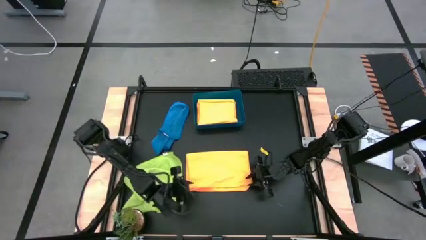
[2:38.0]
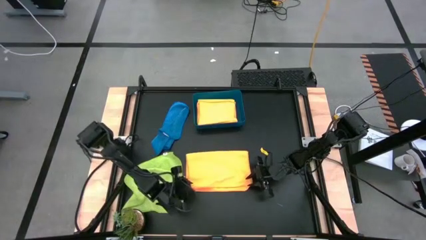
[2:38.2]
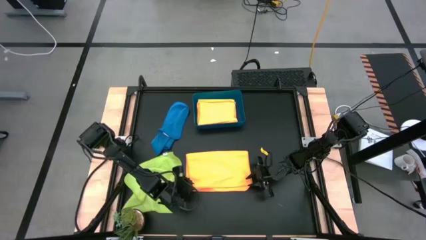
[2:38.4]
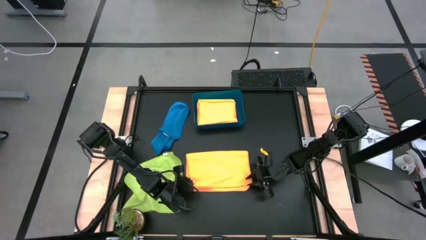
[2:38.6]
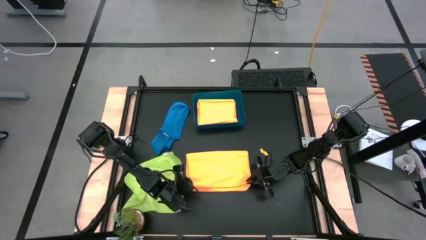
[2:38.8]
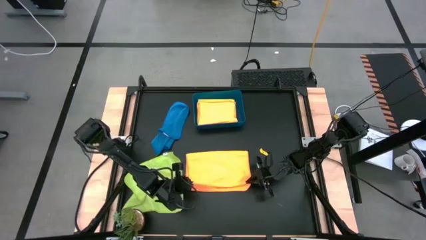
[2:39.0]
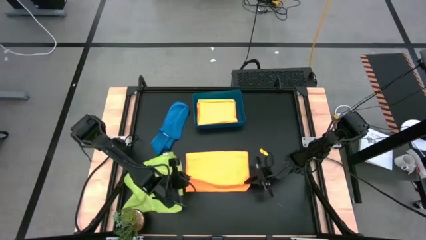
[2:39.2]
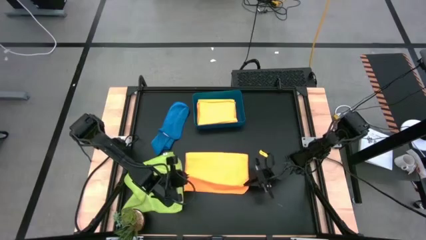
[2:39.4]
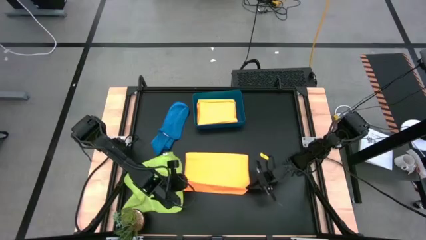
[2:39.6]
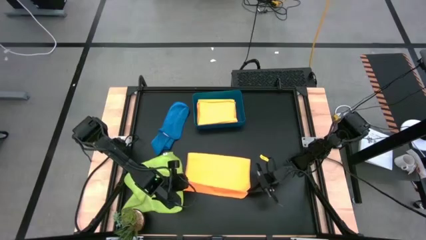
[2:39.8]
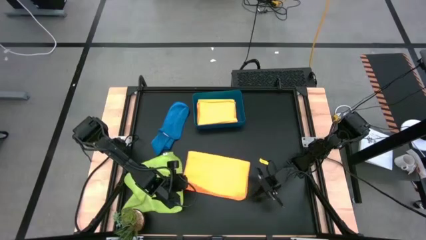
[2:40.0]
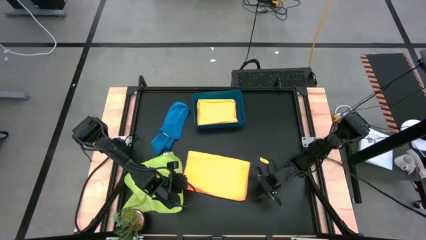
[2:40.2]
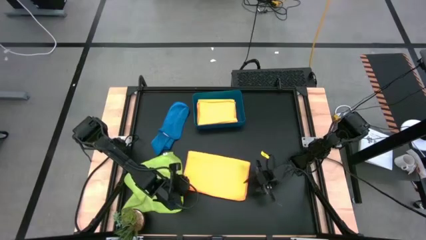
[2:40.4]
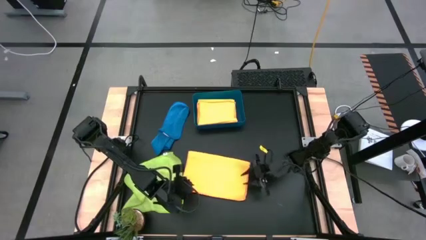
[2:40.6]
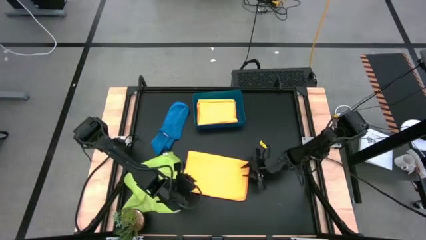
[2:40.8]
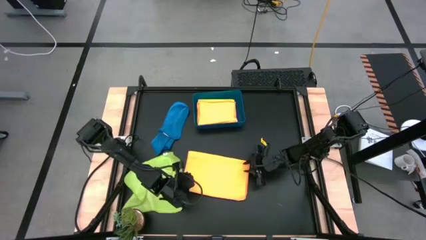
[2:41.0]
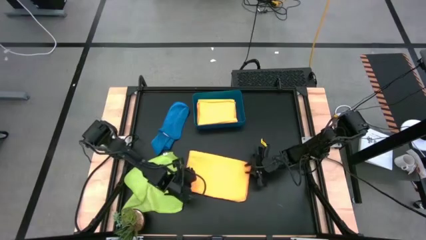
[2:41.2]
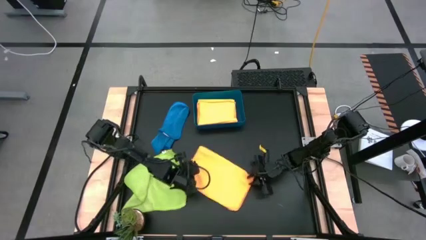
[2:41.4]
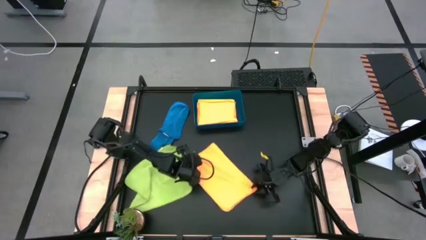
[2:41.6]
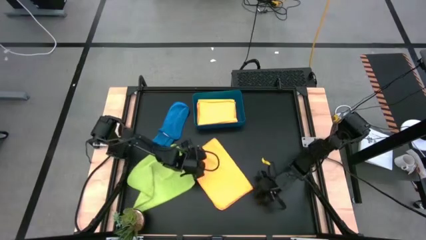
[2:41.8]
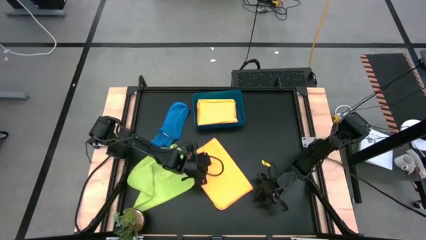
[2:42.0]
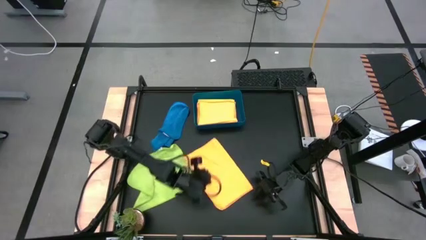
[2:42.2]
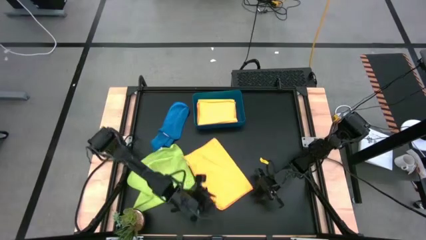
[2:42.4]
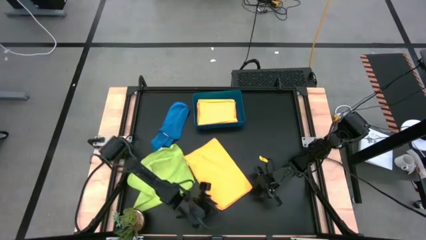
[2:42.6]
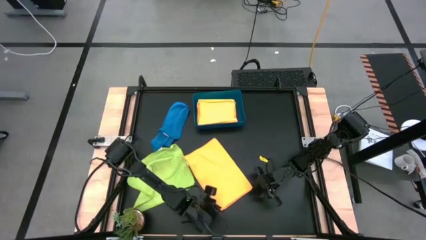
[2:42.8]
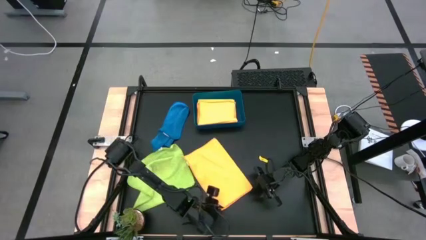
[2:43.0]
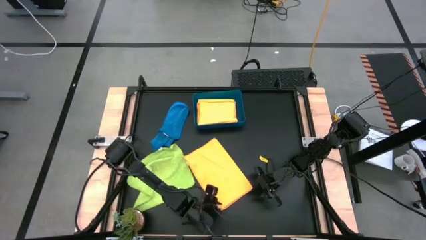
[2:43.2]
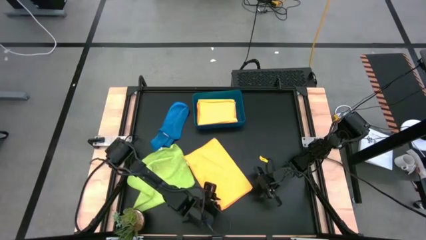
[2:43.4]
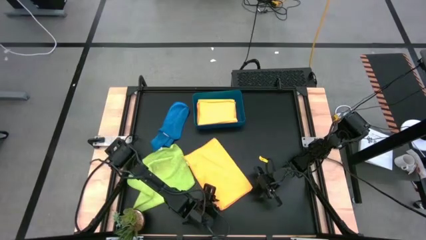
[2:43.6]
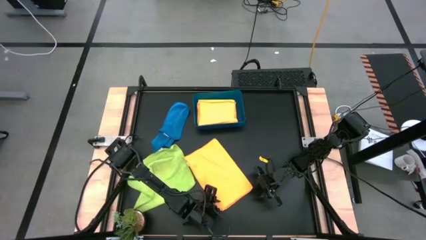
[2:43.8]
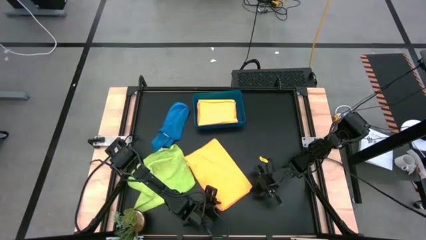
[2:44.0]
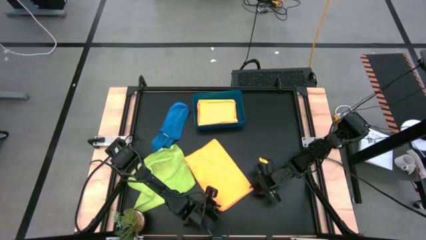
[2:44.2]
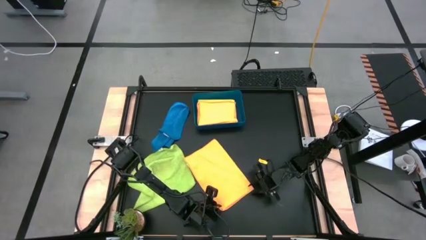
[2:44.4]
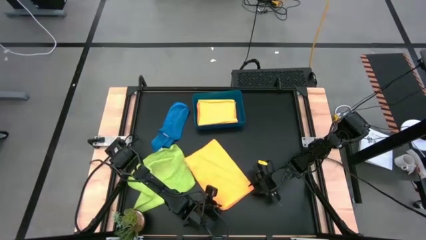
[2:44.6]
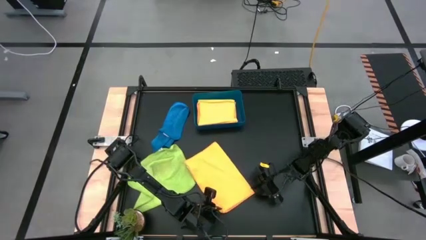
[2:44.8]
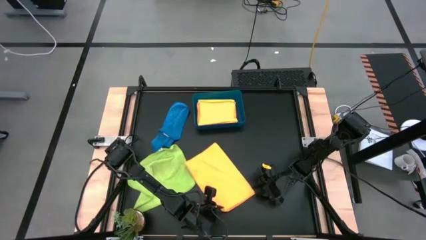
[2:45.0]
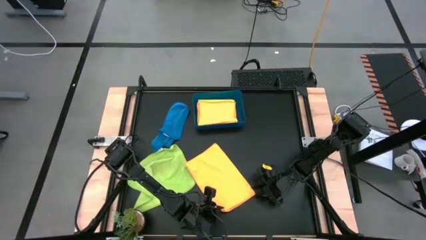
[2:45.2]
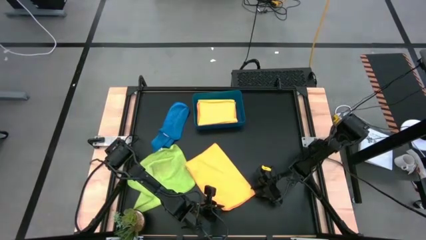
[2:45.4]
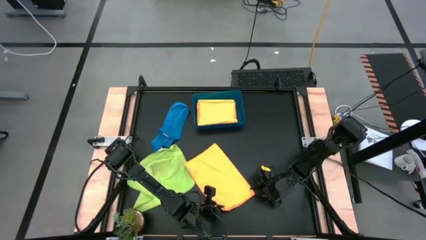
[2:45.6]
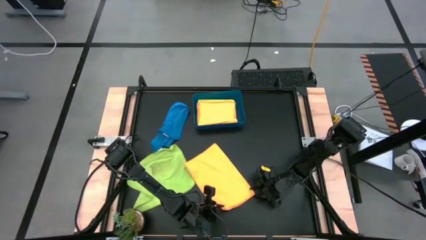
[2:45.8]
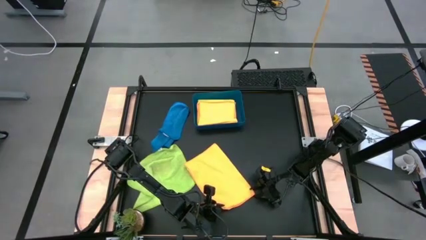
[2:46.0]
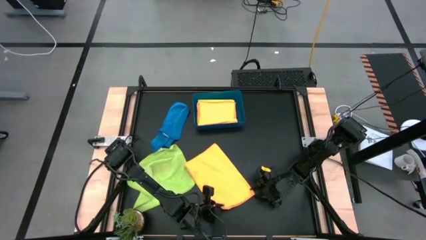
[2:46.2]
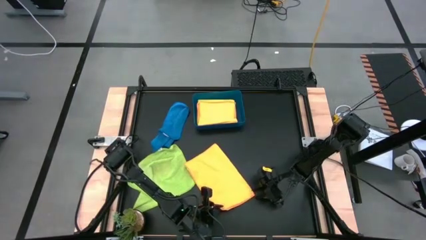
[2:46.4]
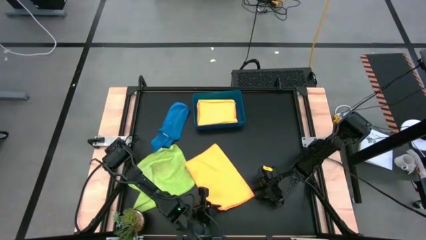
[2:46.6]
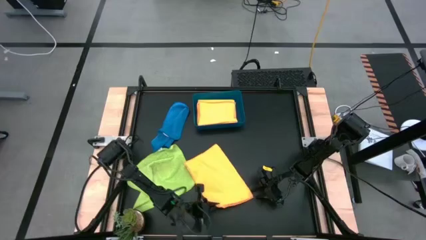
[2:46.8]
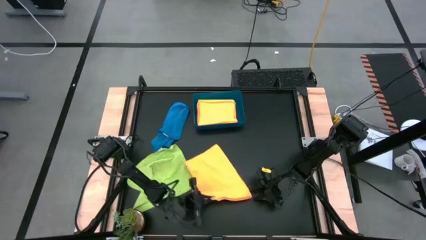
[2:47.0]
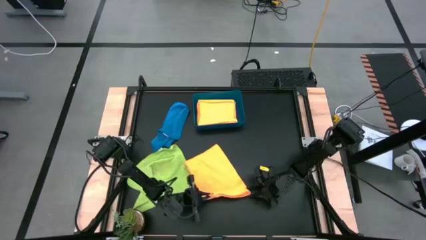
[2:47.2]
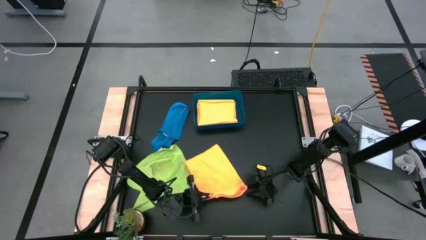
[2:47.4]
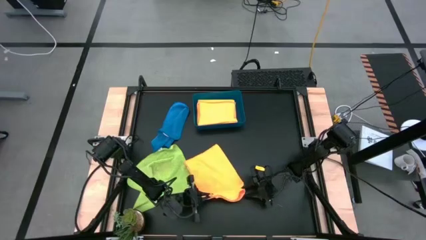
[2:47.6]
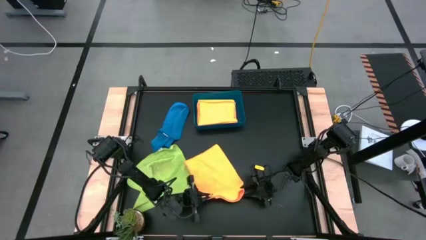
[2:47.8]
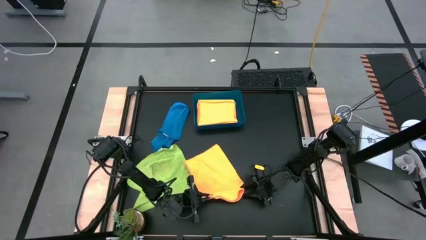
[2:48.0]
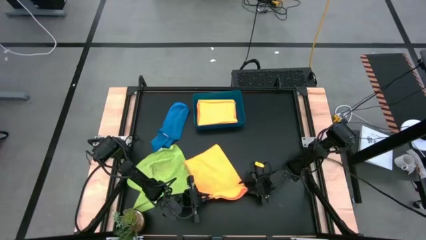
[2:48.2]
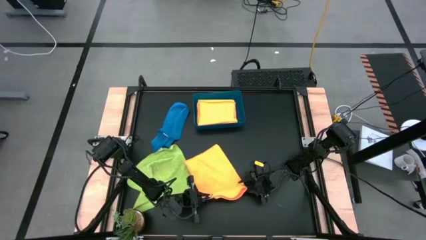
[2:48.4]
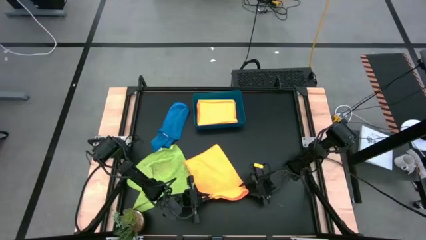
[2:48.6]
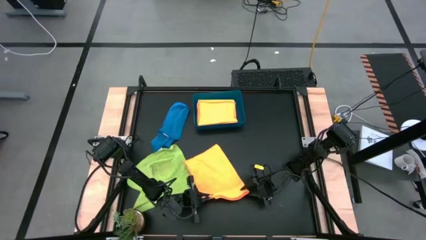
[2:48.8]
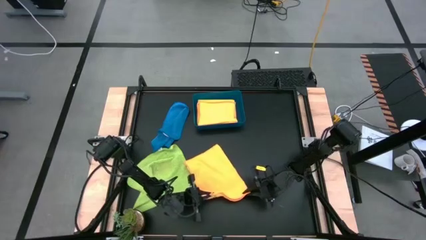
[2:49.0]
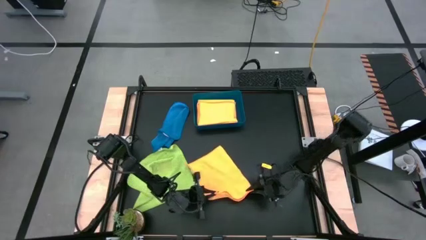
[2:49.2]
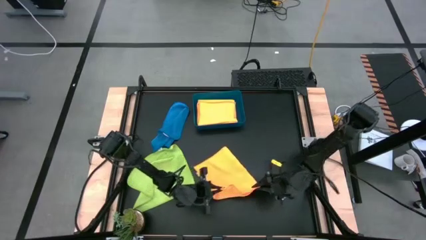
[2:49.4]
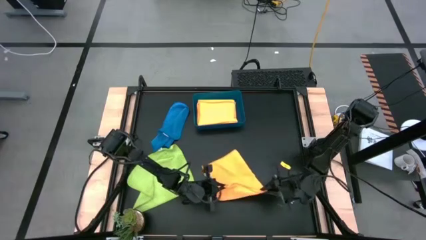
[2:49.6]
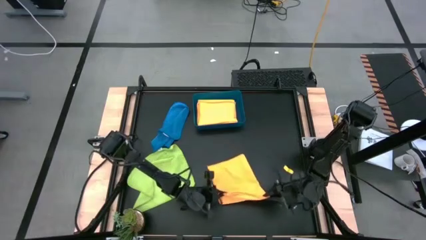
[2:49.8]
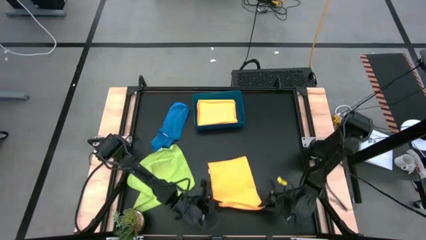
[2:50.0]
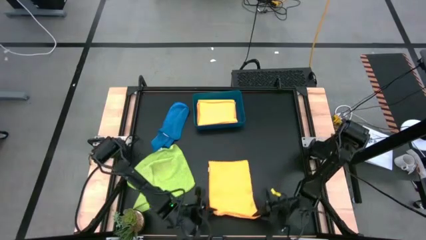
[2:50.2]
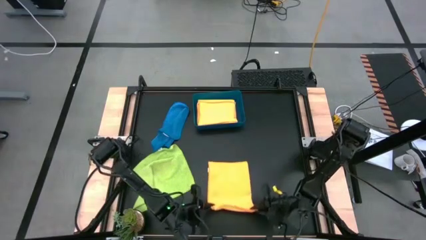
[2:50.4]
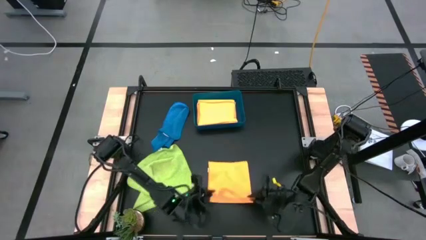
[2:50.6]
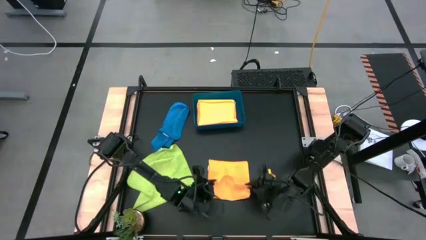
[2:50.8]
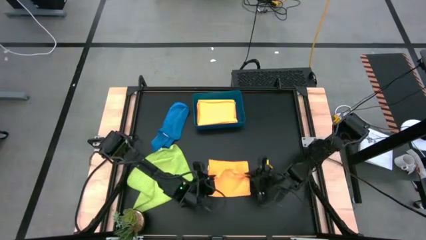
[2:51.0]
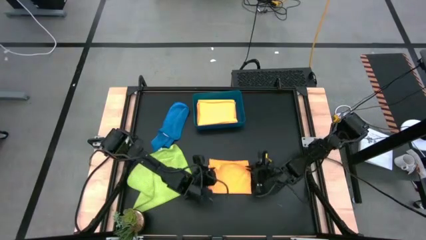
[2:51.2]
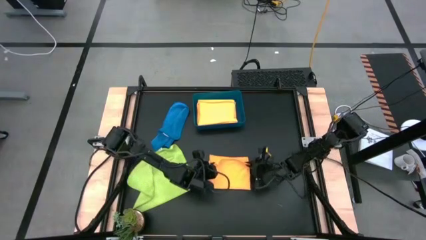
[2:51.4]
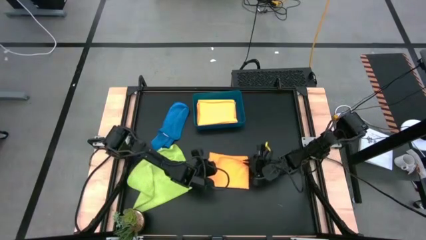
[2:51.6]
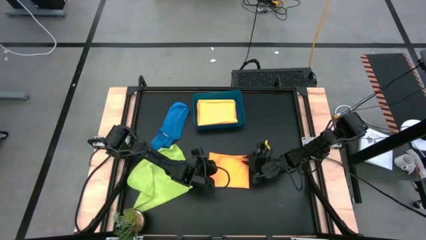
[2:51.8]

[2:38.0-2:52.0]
Task: Fold microfiber towels
Fold the orange microfiber cloth
